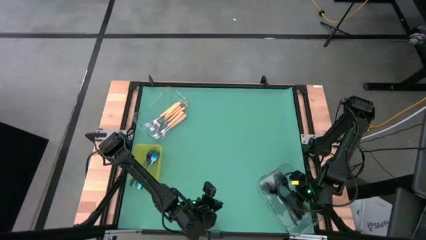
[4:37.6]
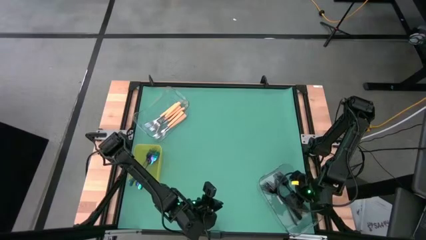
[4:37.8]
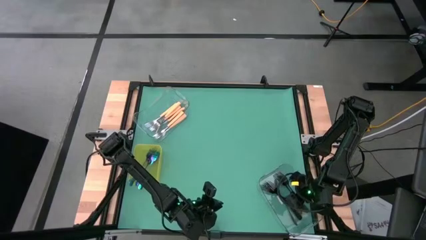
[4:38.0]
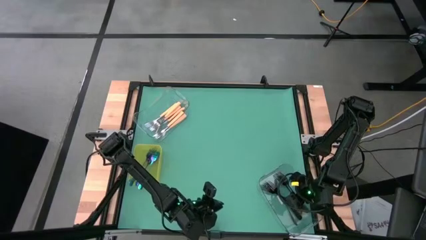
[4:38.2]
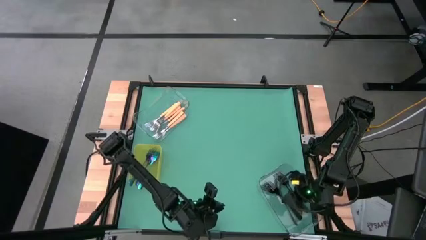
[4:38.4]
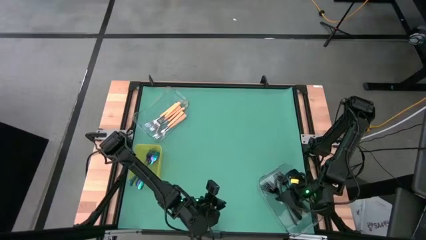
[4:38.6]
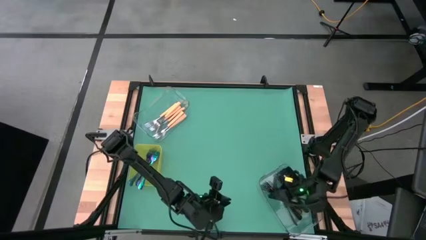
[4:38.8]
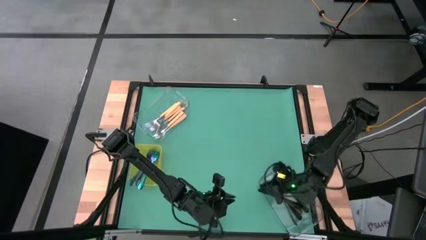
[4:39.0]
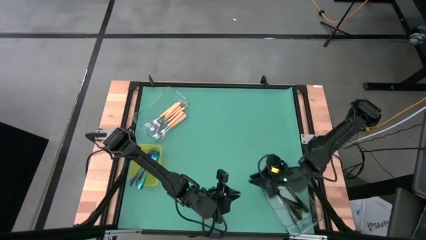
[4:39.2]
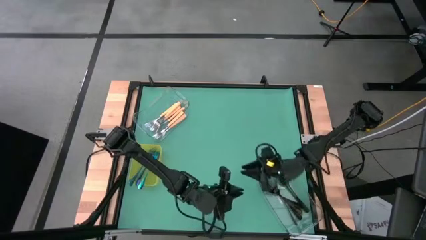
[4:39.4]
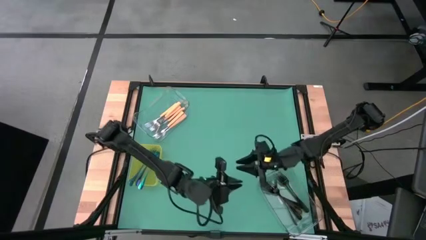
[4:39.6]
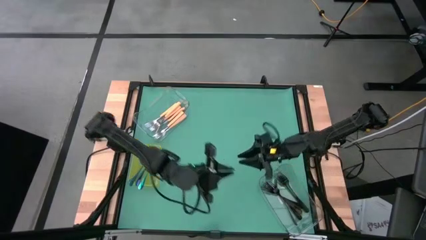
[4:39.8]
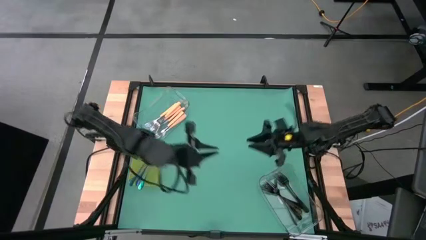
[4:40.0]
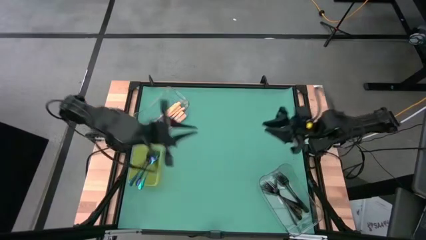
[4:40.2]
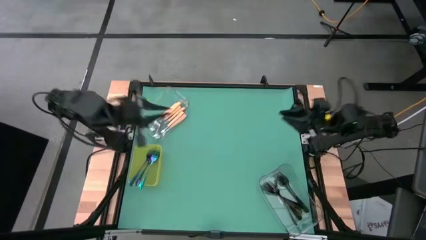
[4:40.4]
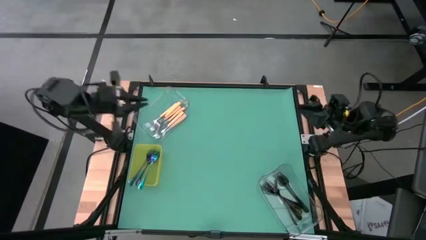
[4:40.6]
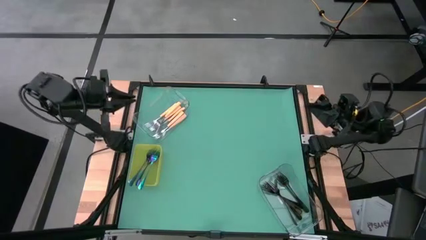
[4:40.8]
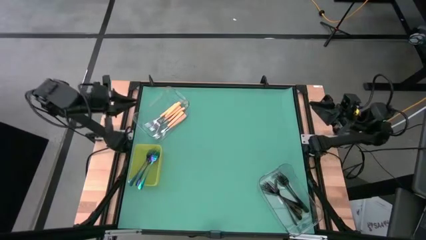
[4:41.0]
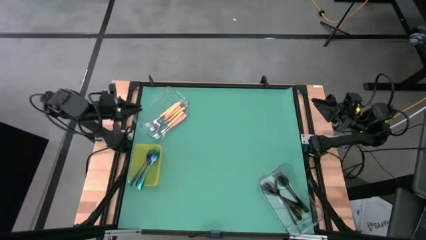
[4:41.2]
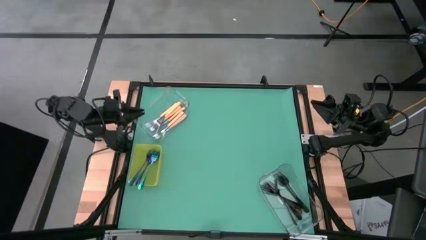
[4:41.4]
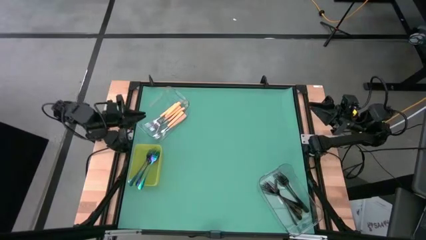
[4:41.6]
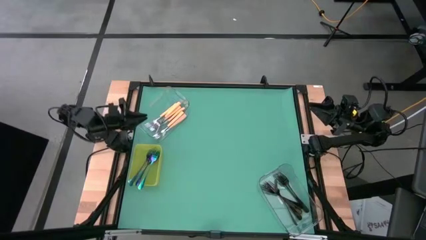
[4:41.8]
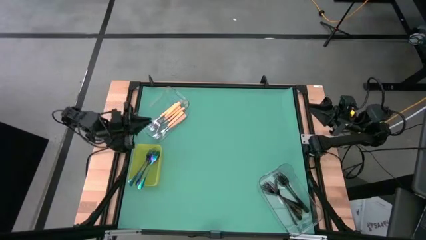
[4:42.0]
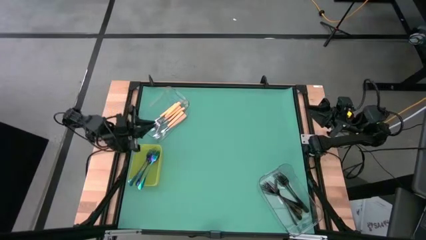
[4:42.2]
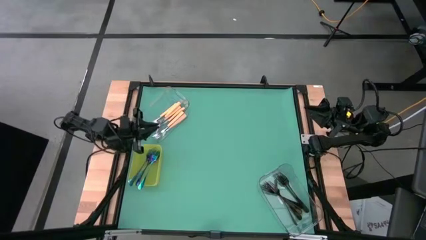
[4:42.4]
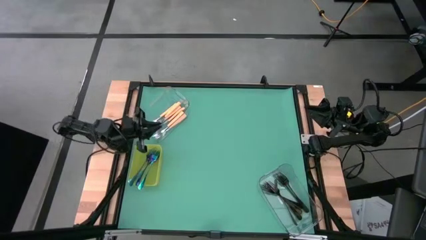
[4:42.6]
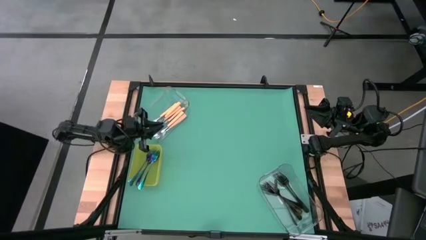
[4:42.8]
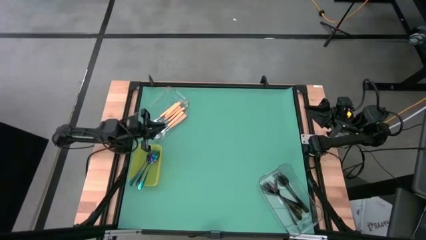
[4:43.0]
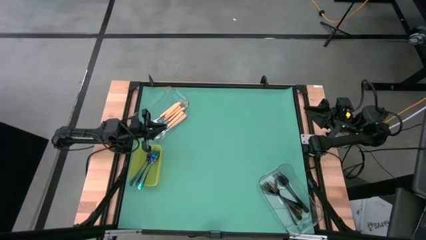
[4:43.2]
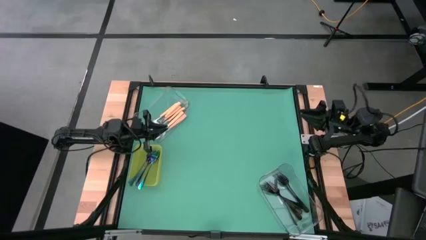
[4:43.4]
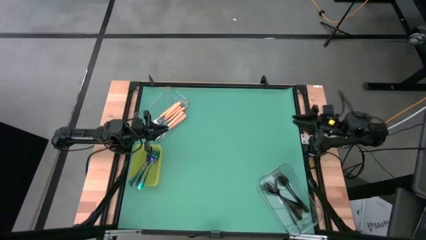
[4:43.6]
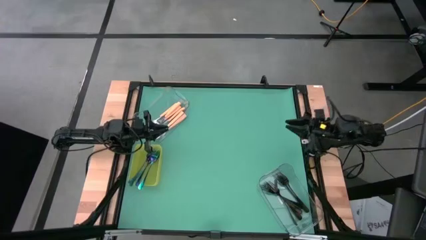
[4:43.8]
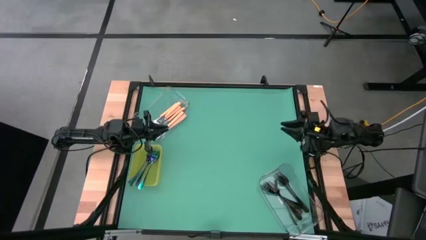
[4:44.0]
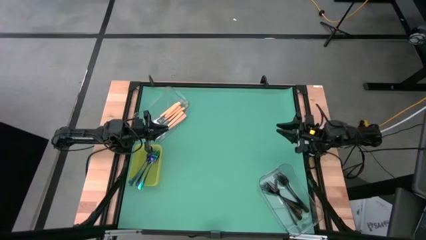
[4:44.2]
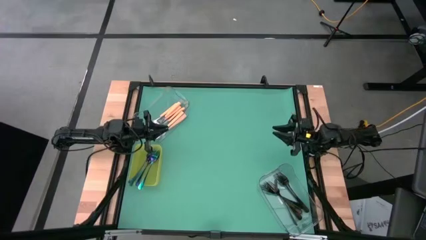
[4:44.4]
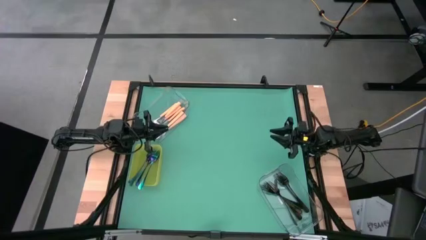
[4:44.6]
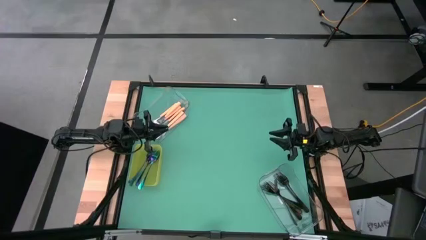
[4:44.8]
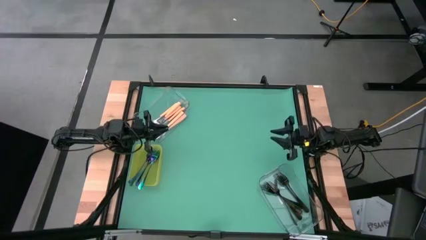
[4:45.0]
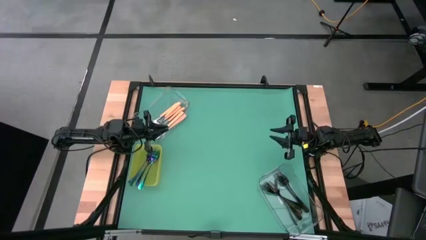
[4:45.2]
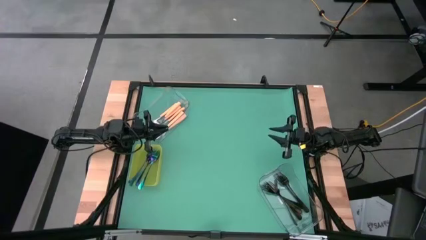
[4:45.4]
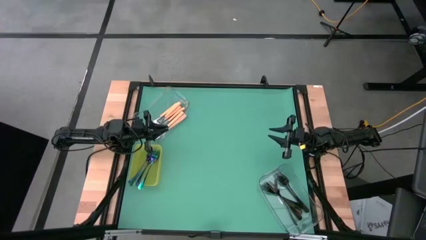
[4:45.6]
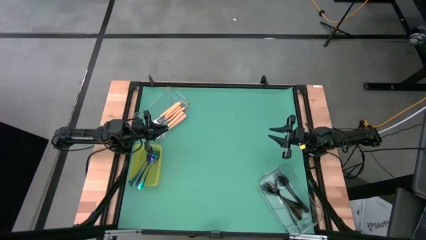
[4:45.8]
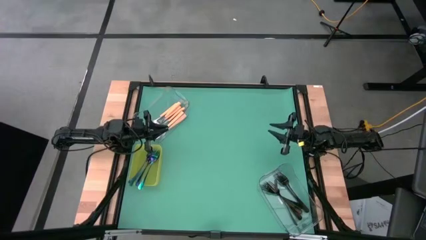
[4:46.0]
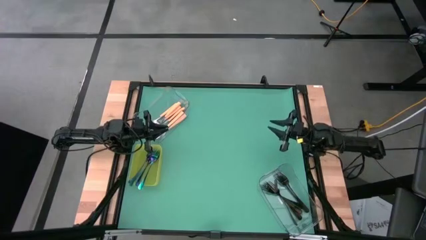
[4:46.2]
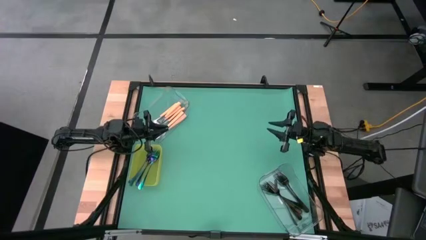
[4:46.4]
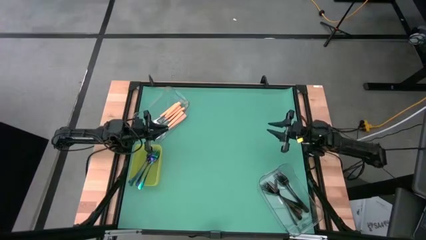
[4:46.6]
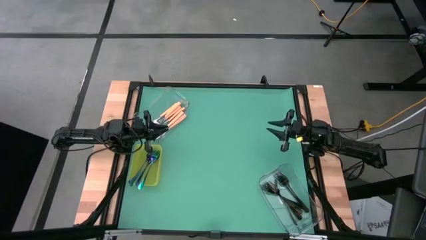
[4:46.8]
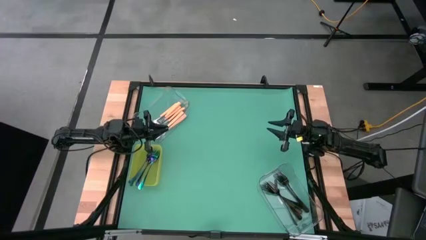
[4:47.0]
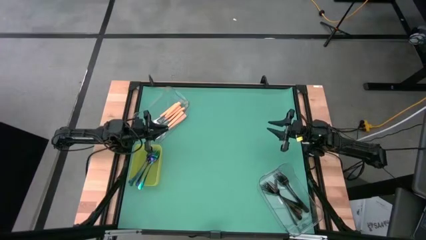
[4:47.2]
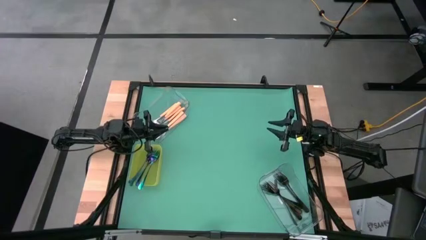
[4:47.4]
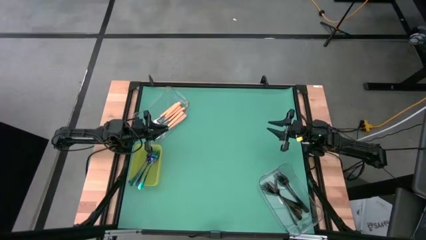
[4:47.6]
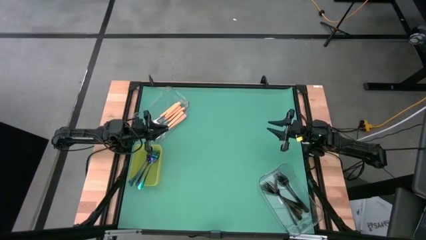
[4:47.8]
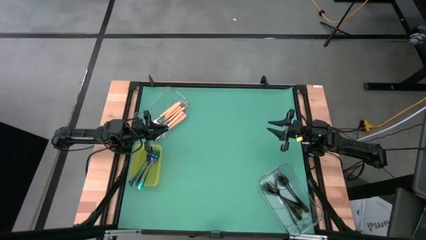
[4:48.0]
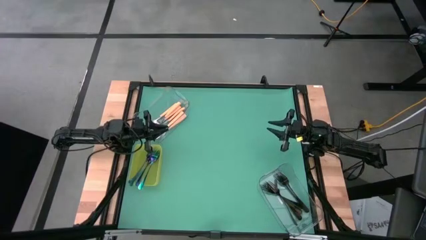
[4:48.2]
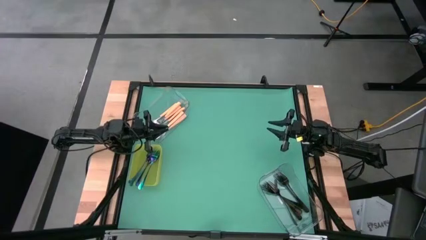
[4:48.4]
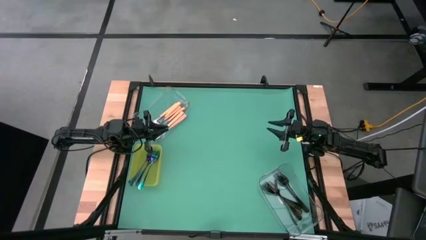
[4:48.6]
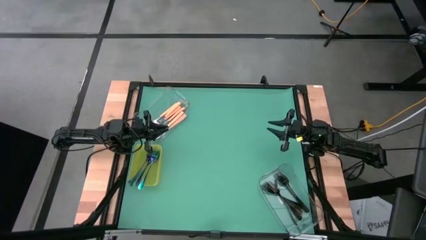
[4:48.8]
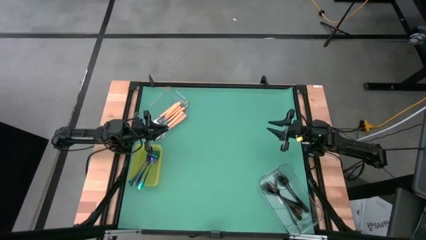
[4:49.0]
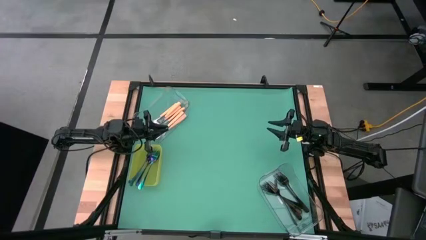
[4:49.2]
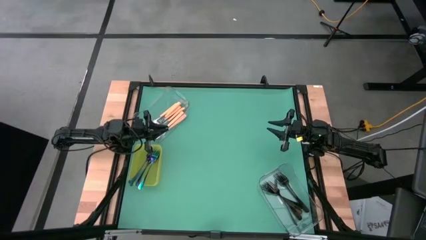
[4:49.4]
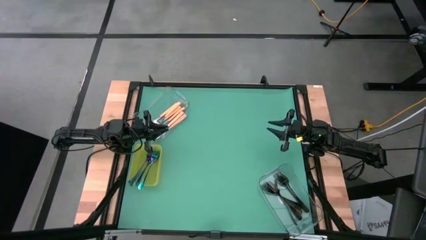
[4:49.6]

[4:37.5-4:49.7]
Task: Sort silverware by color (type)
Return to Home Position

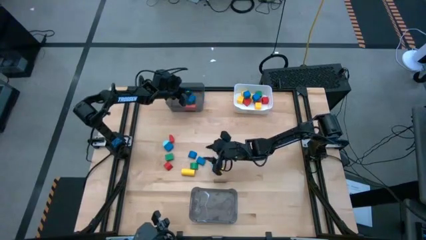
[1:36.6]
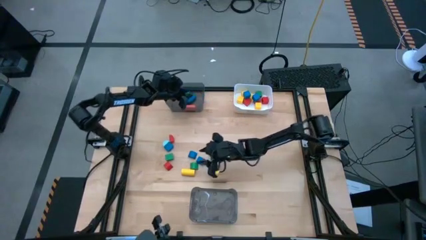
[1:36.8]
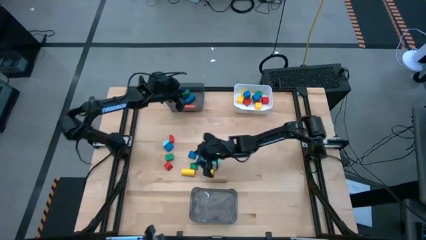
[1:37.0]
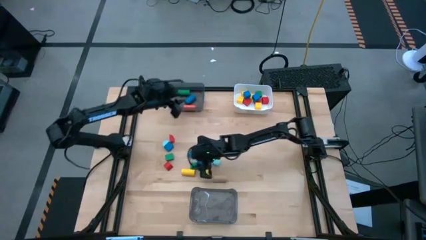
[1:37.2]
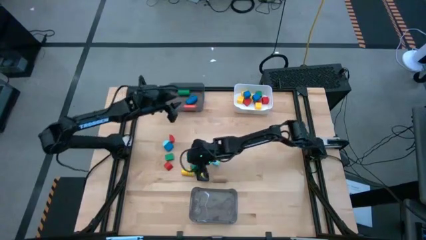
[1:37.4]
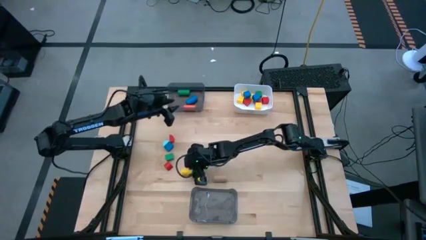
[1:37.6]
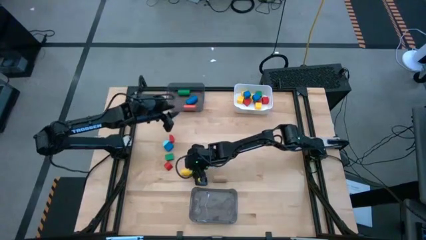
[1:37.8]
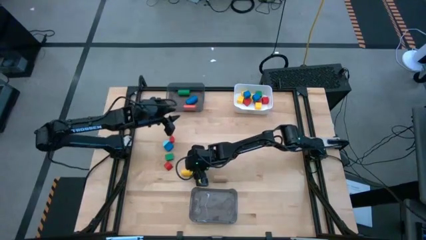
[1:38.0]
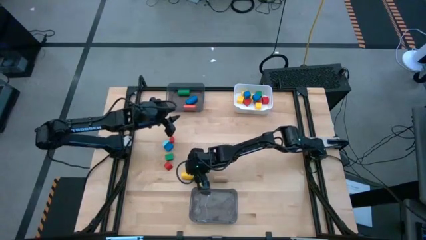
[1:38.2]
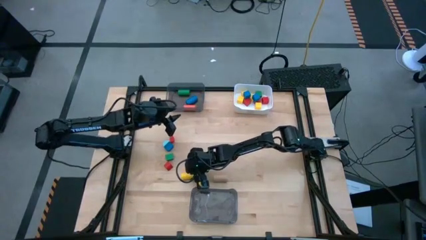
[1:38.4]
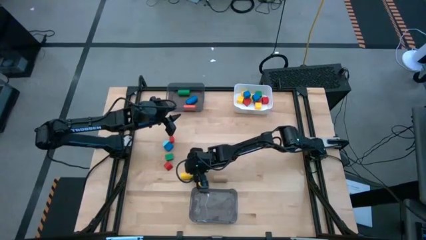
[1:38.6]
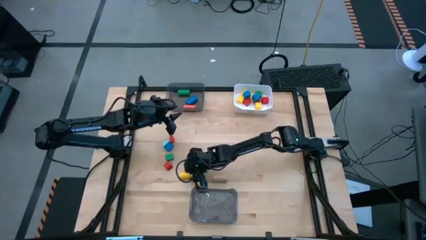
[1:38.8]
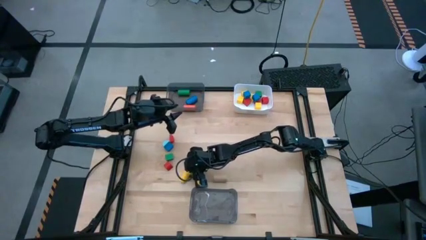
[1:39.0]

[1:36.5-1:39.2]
Task: Sort blocks by size
Put the yellow cylinder block into the top black bin
